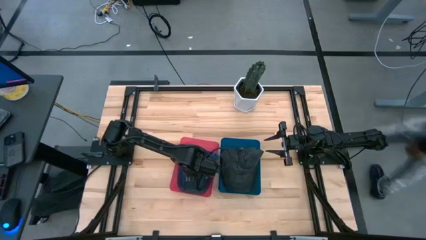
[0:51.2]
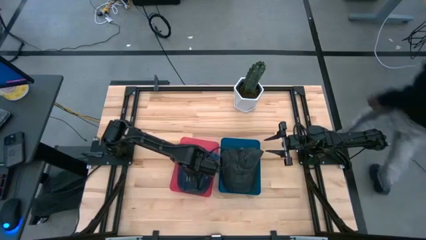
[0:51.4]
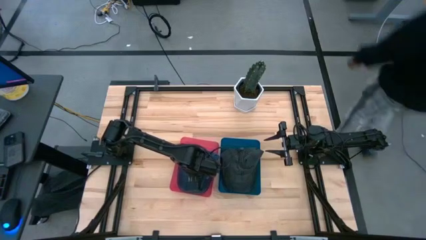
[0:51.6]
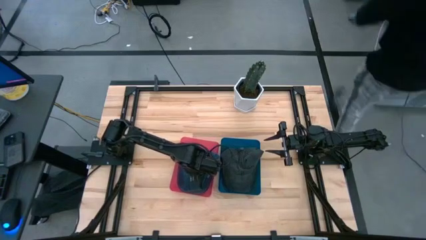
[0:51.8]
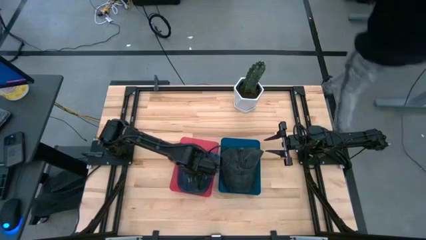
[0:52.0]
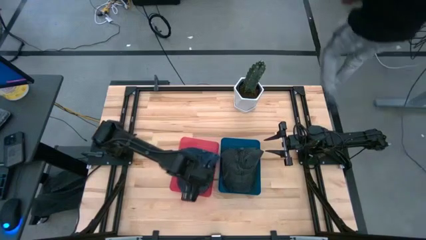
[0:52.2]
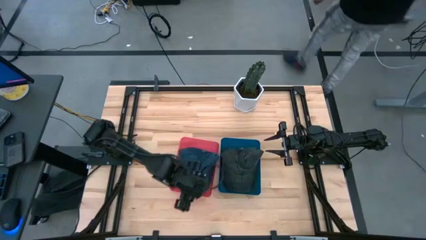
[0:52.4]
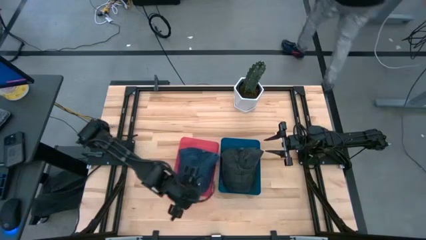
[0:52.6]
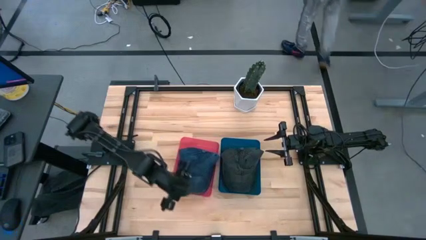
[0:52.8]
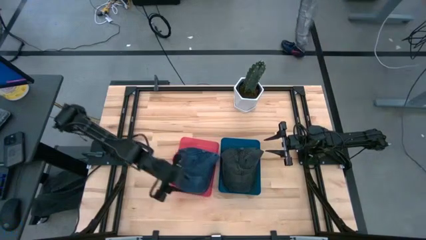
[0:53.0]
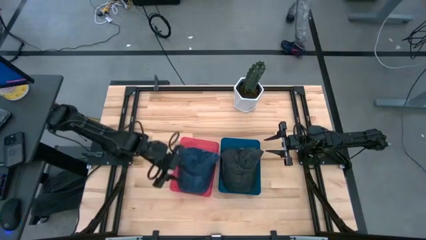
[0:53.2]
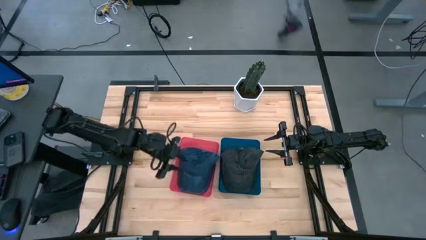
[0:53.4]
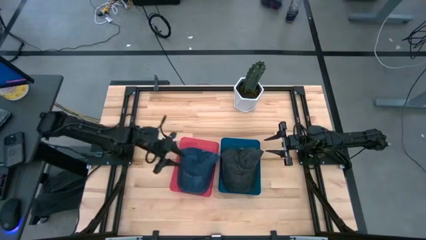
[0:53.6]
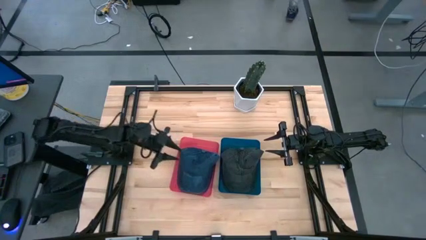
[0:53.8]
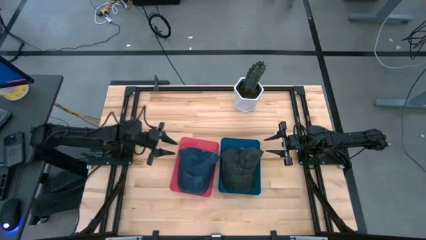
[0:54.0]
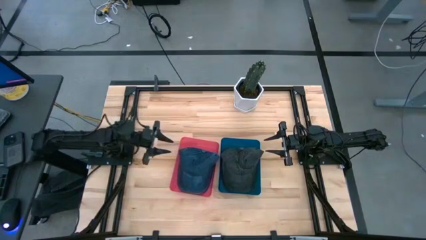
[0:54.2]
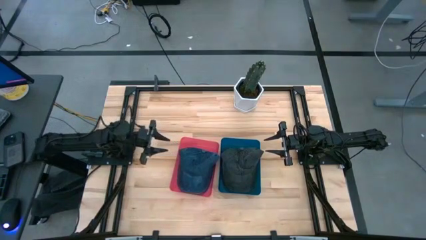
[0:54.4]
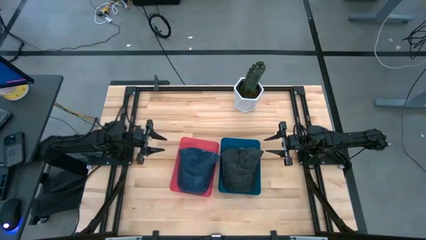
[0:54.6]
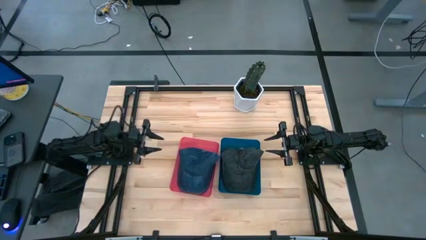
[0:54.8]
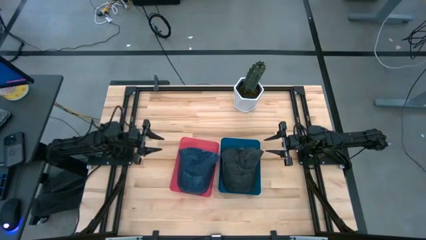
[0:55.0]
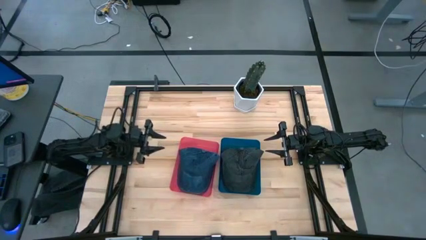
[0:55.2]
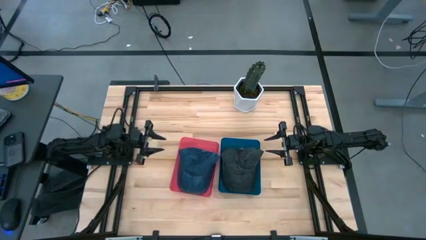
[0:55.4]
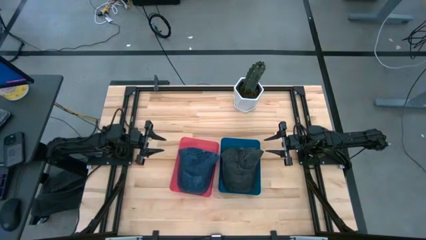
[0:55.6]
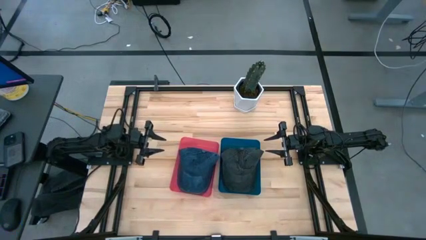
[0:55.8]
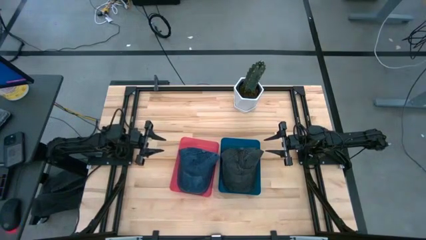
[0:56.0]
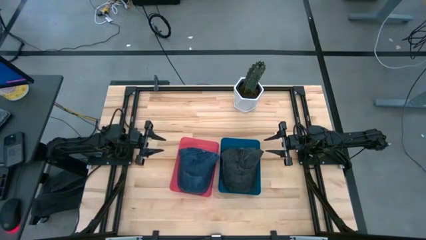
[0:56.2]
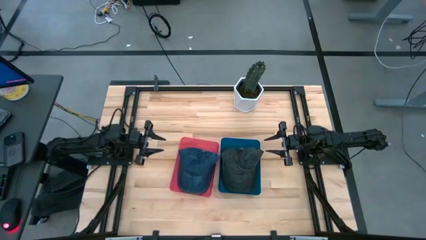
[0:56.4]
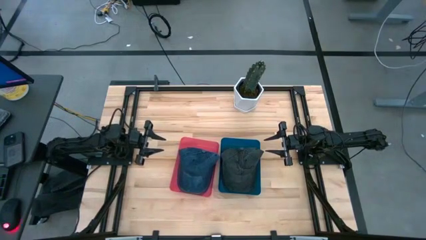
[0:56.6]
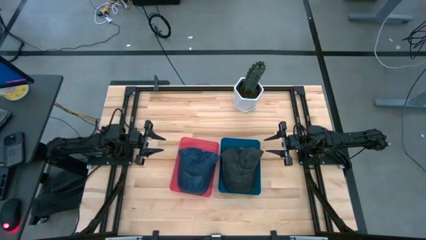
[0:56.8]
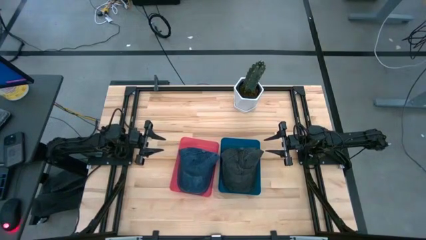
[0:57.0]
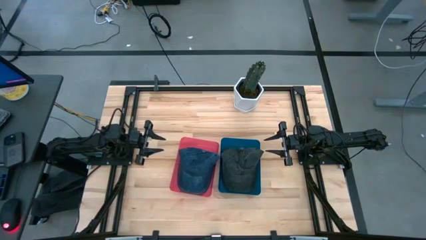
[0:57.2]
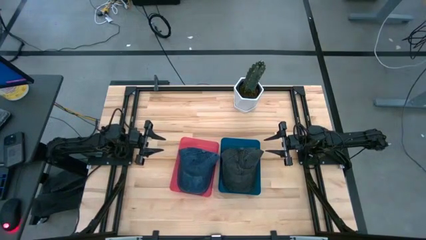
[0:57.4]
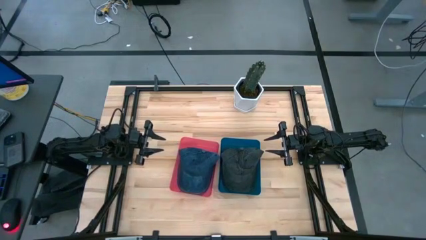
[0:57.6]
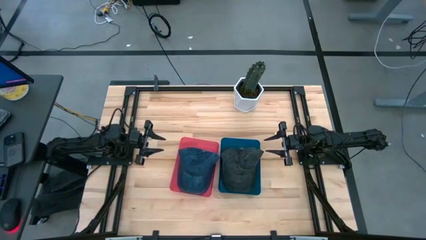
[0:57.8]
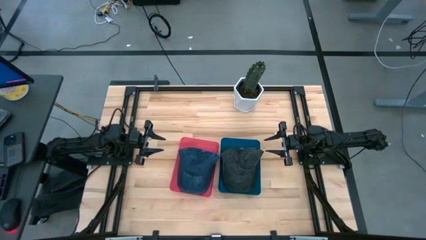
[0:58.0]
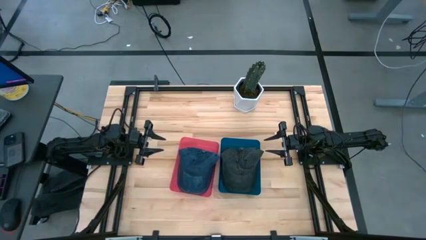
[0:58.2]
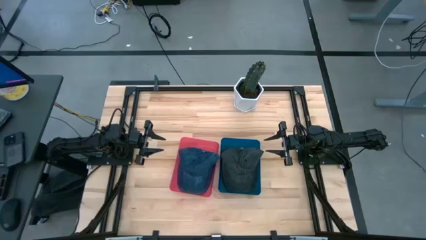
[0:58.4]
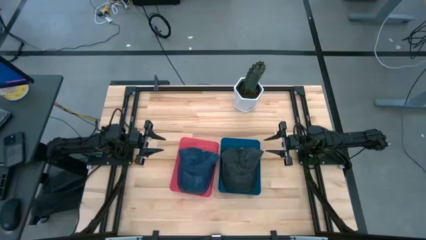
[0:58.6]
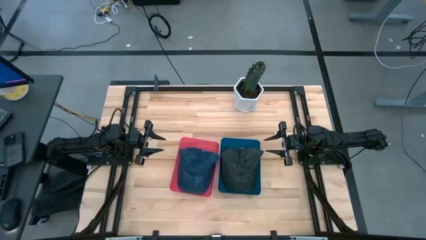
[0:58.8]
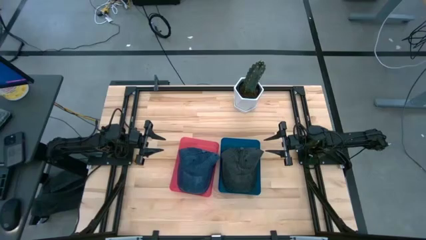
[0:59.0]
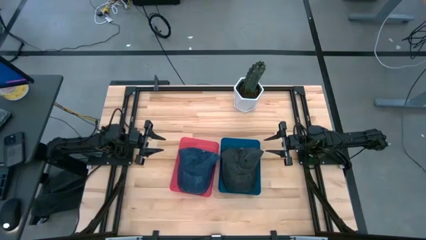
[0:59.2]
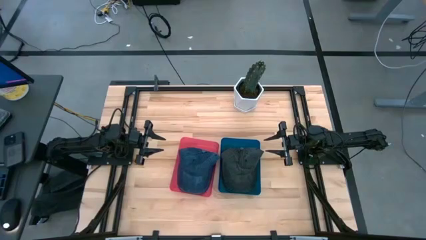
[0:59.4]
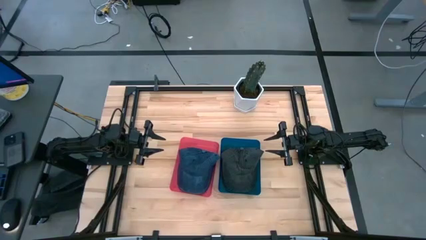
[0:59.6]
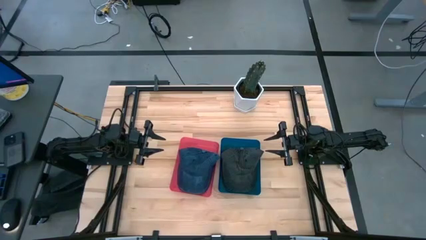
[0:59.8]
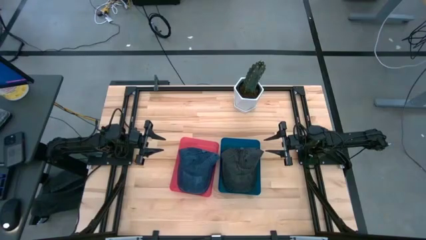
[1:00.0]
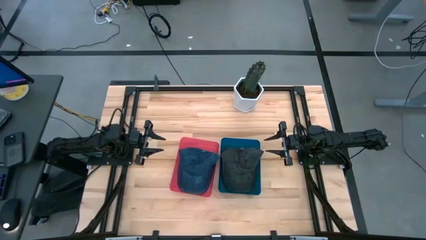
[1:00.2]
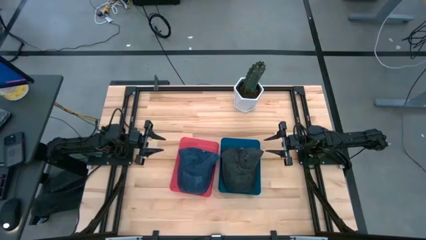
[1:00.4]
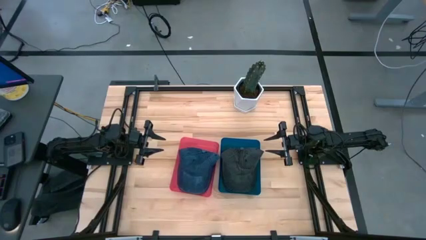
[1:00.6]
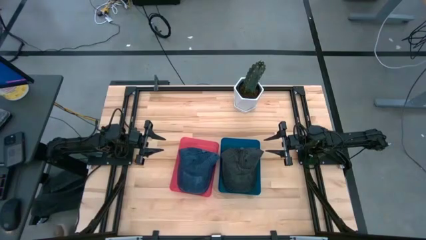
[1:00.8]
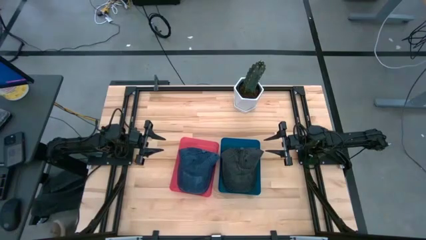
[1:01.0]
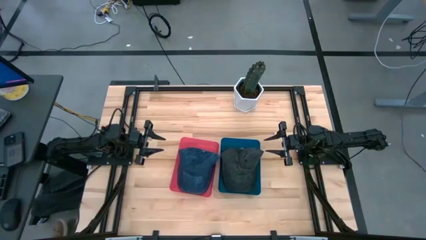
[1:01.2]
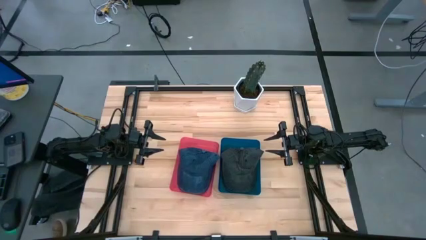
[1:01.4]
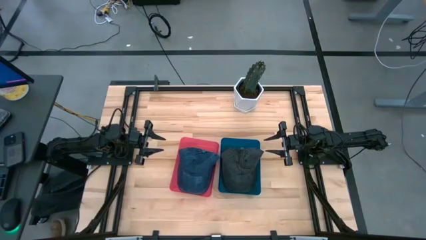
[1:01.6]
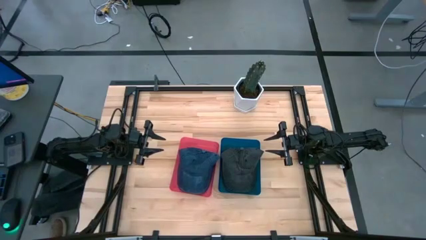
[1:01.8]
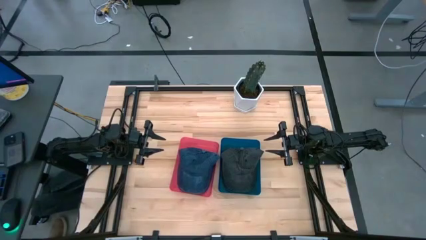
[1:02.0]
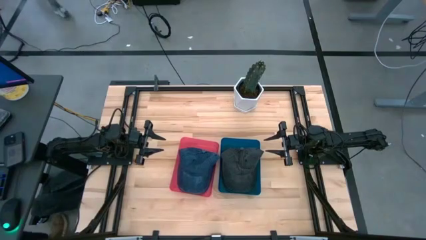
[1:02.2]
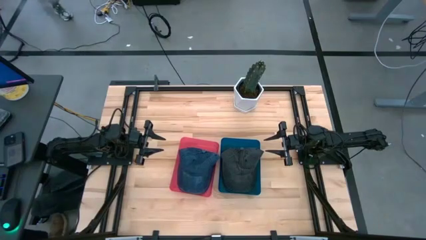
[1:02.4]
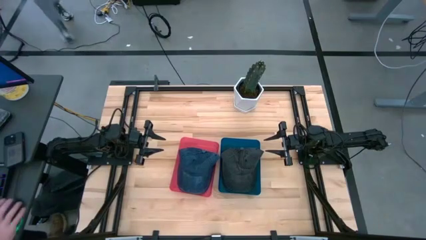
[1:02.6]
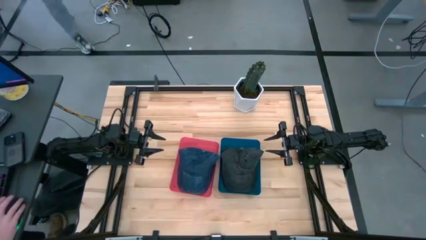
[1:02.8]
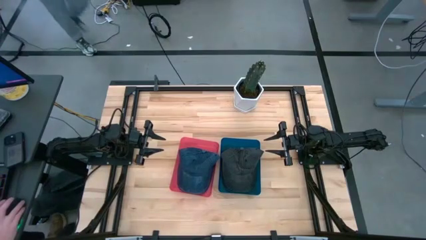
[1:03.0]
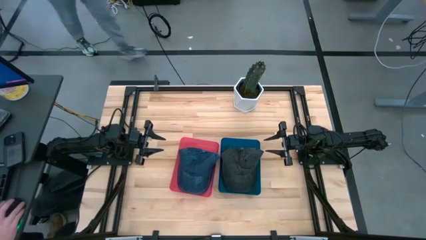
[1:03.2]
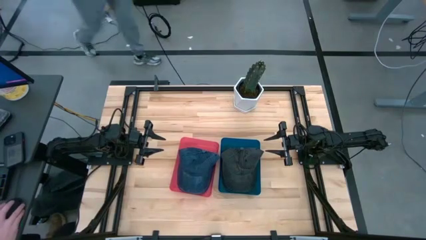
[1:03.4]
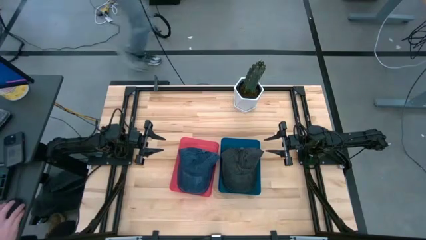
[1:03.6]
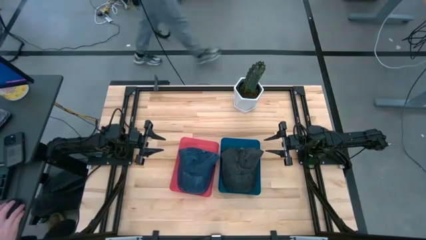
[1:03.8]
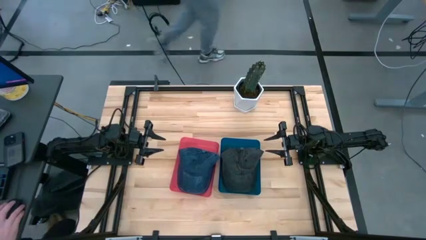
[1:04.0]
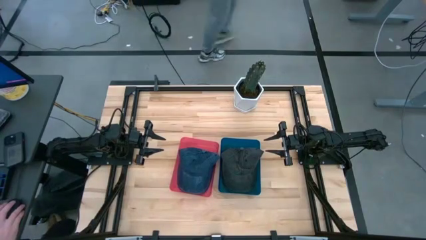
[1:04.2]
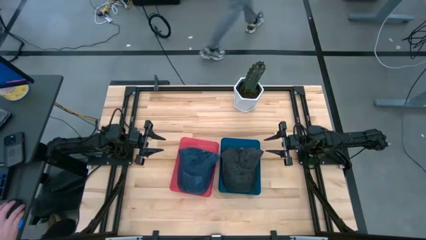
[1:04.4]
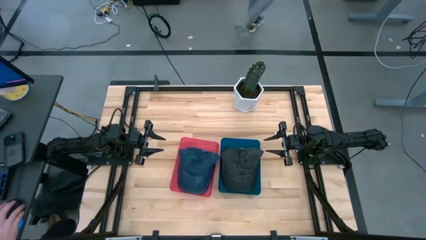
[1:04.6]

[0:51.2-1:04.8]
Task: Pick & Place hat
Return to Home Position
